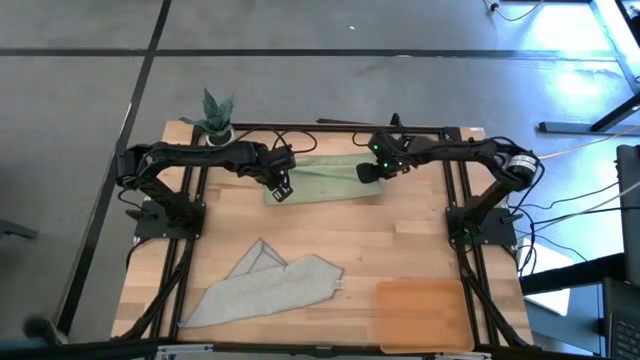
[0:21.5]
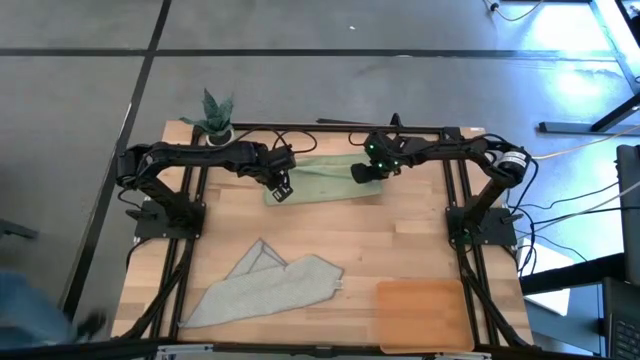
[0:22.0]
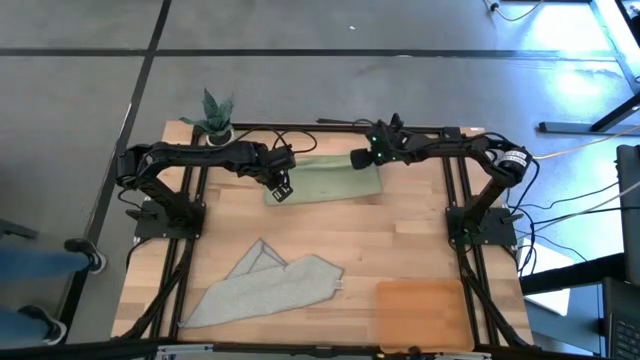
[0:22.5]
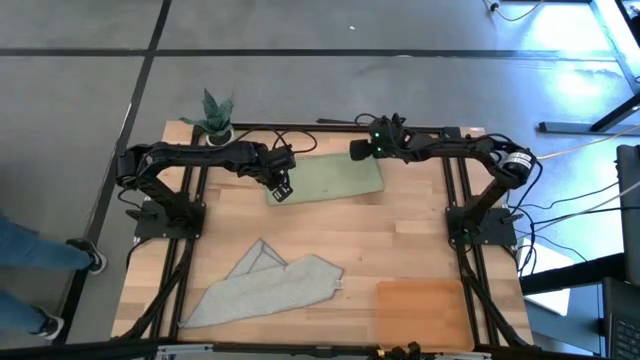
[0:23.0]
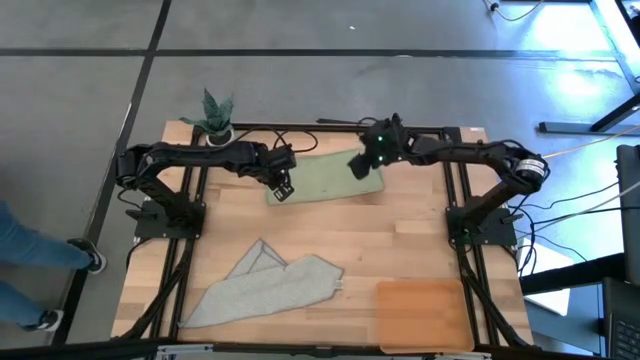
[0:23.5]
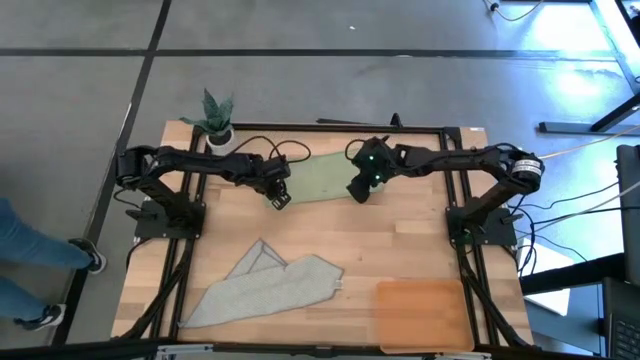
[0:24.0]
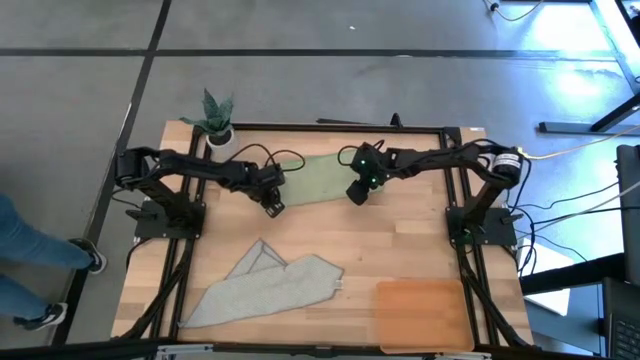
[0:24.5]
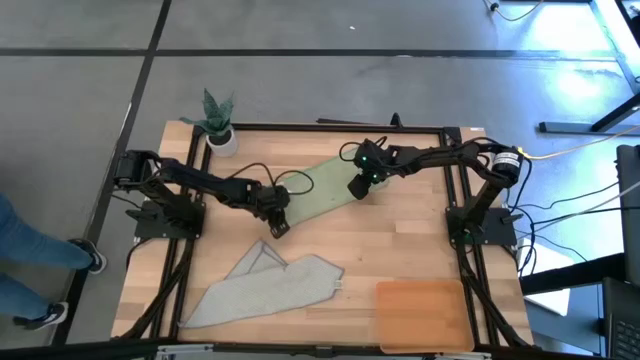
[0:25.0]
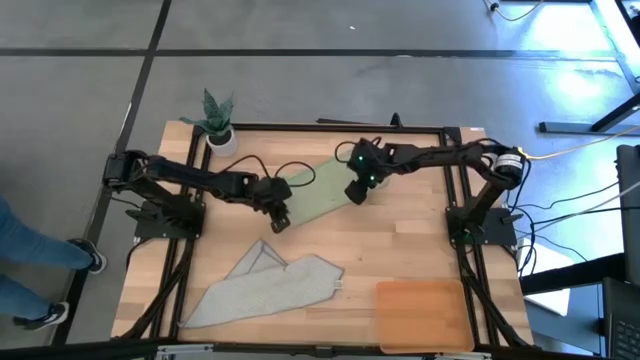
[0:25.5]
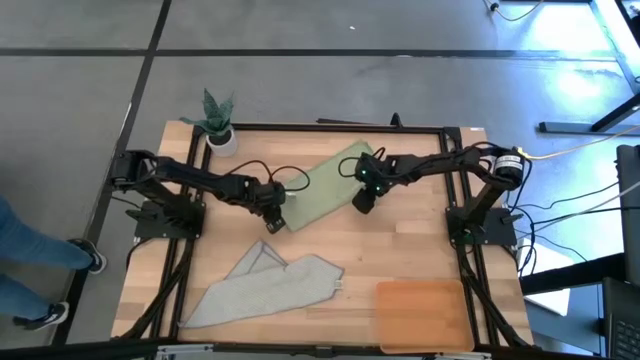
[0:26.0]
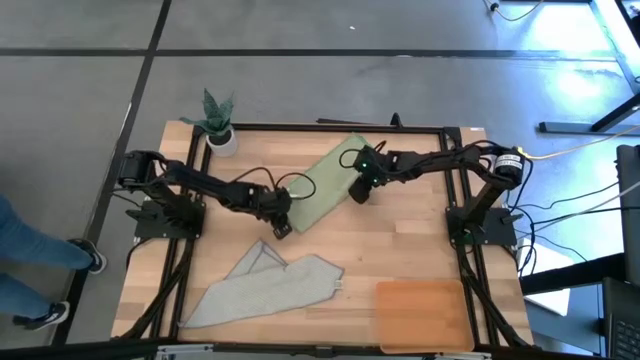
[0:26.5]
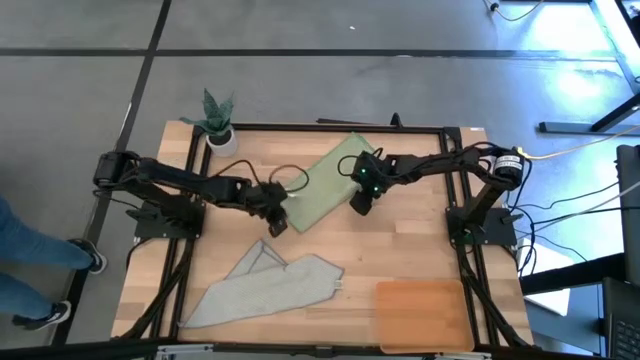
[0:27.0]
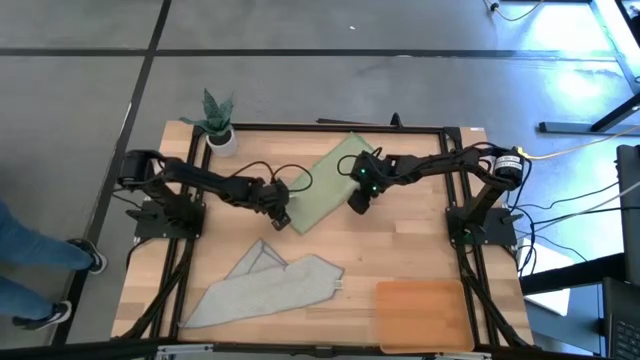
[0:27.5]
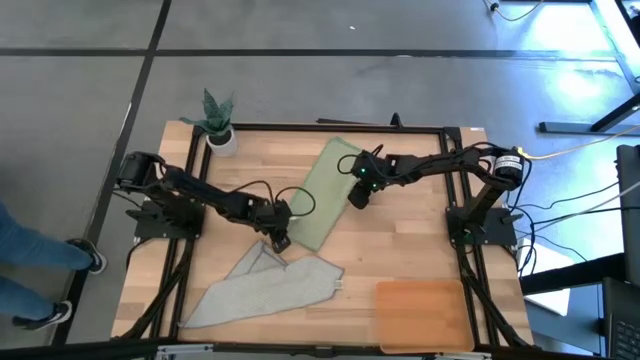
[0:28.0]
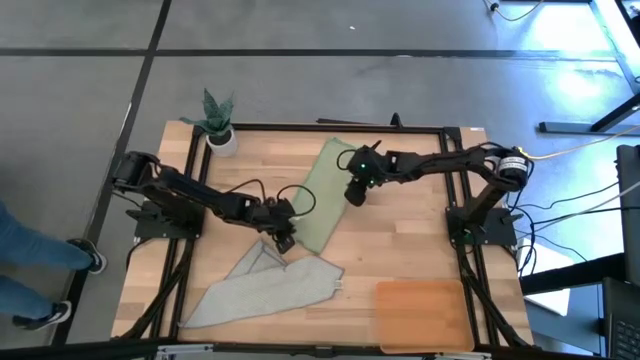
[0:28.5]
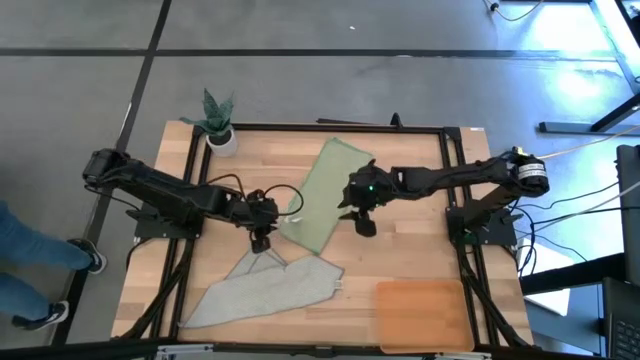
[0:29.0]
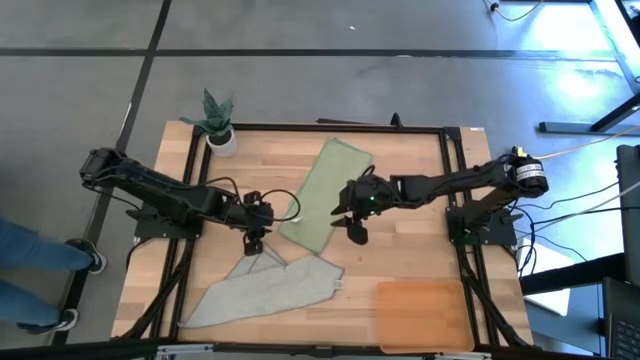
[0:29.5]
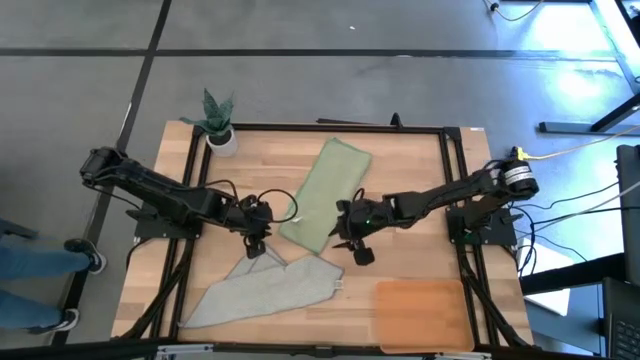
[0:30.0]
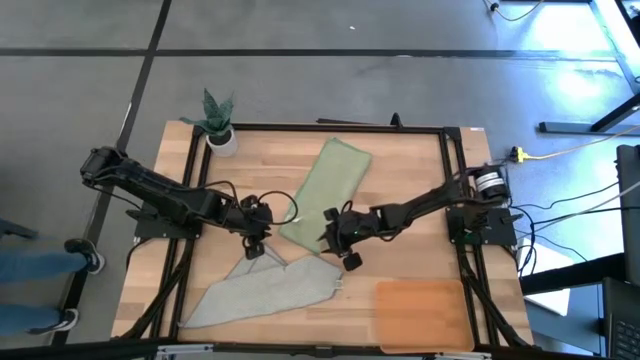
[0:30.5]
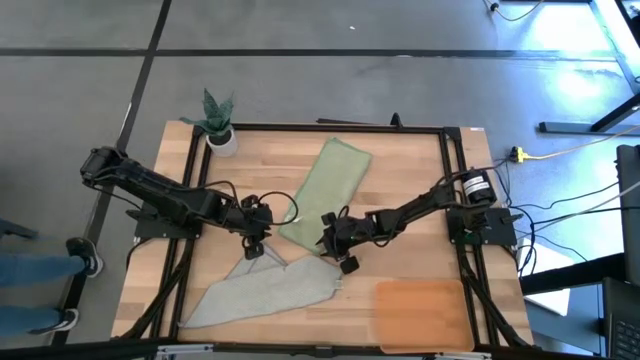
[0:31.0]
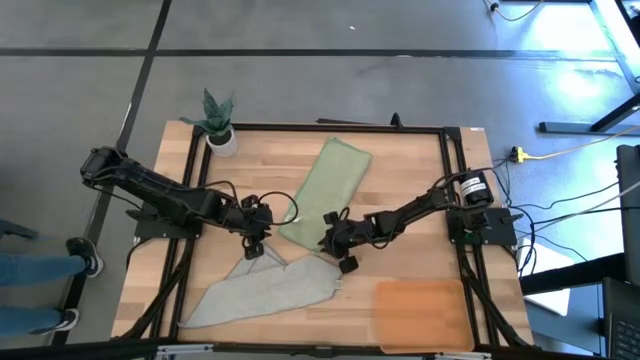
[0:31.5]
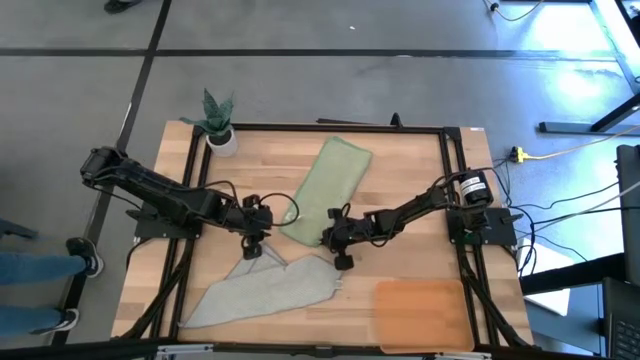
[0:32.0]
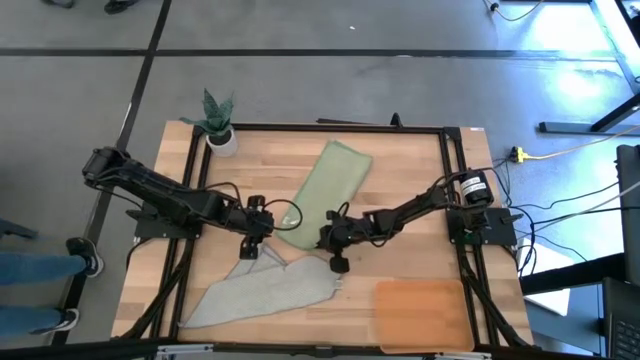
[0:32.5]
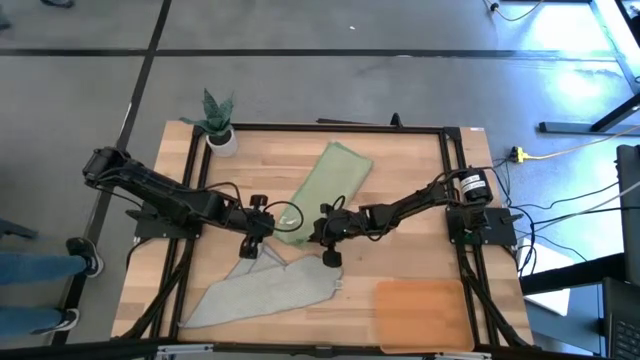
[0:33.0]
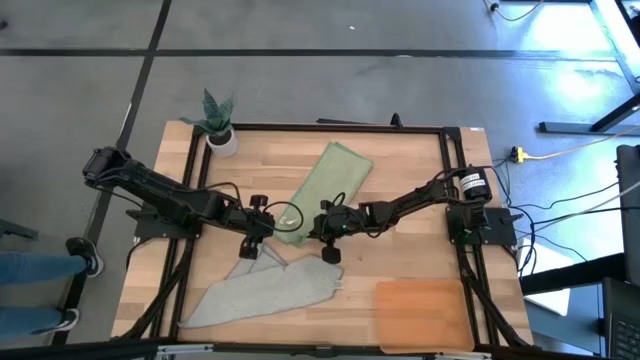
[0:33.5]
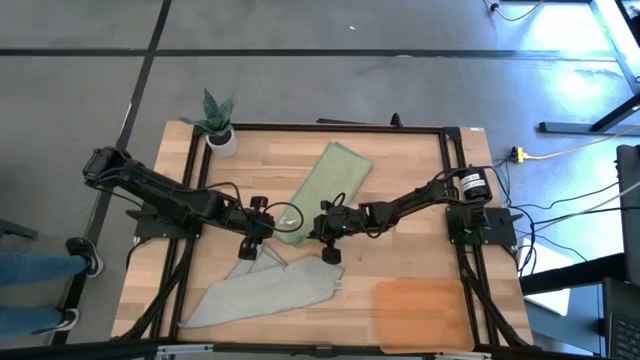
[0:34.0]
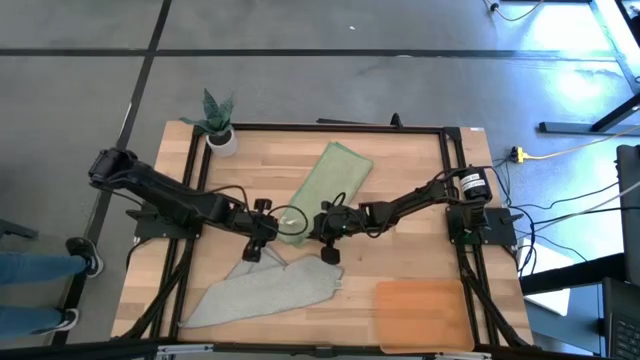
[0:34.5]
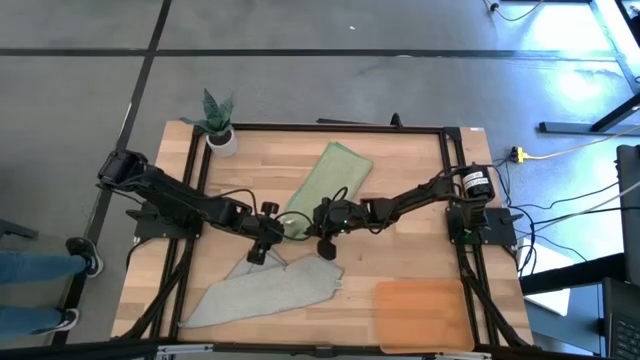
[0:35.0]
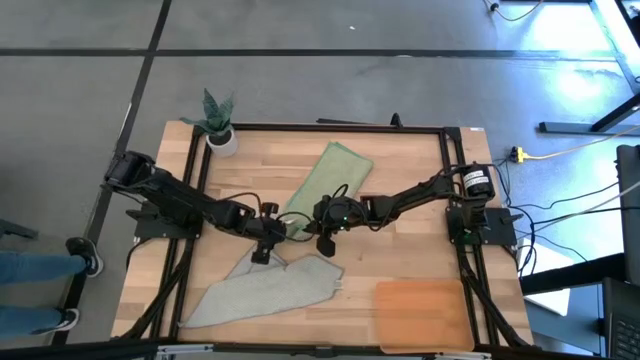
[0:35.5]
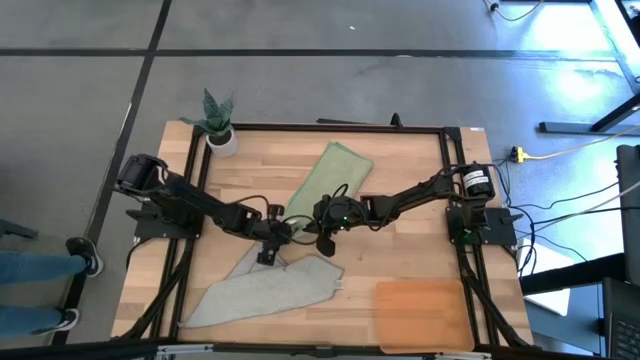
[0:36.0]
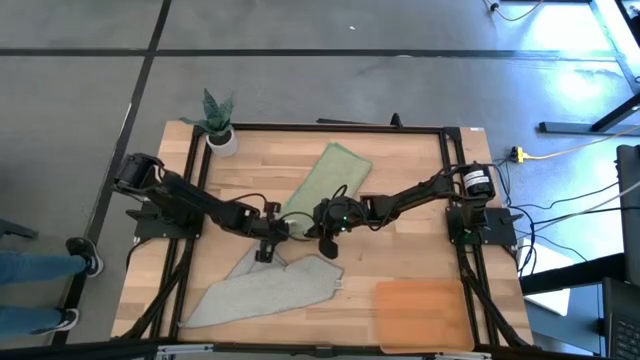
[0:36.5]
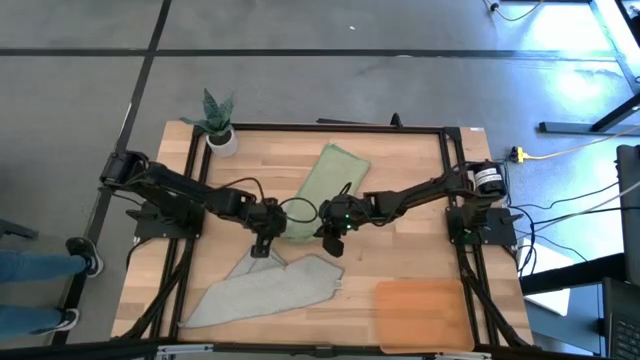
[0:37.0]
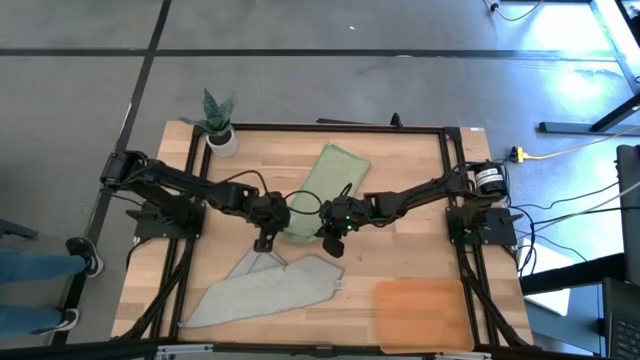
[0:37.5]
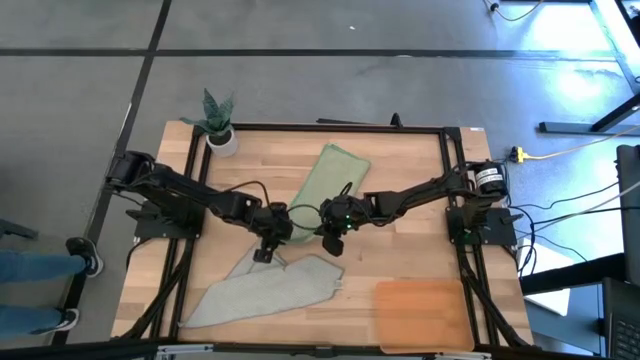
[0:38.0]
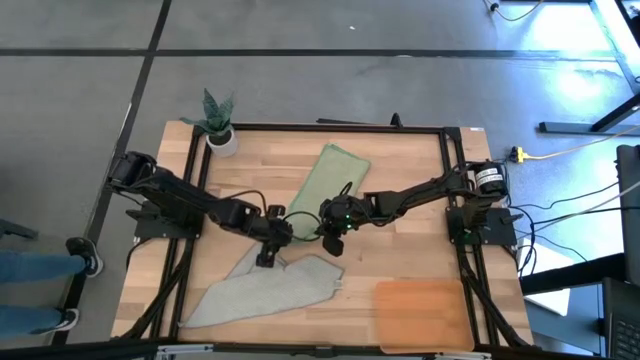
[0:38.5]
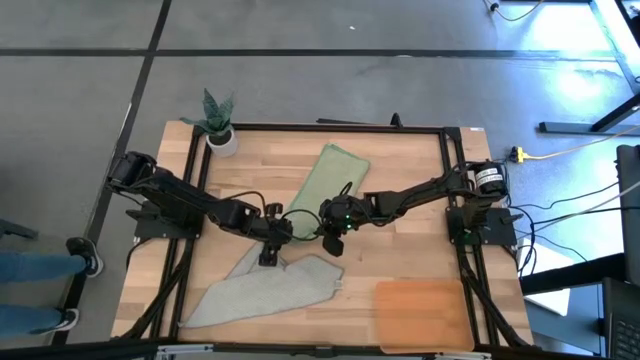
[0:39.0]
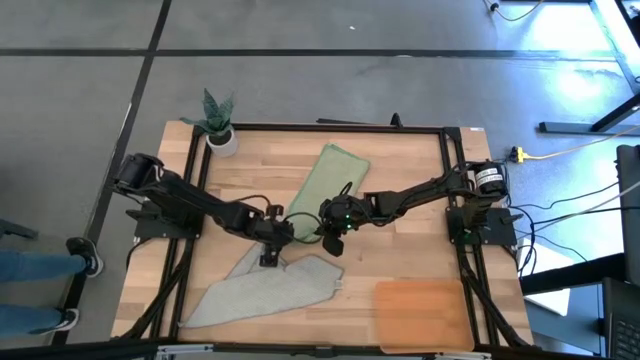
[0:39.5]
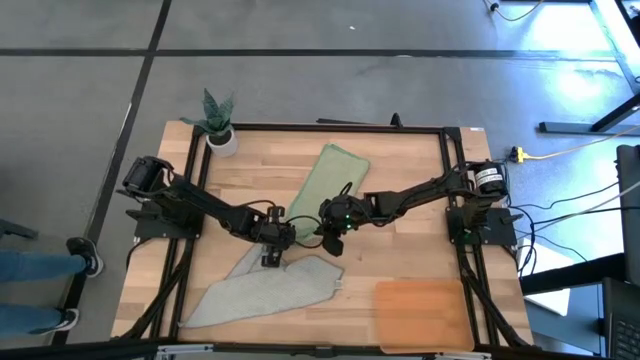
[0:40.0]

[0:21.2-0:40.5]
Task: Roll microfiber towels into tight, uniform cylinder then place into a basket
Roll the green microfiber towel

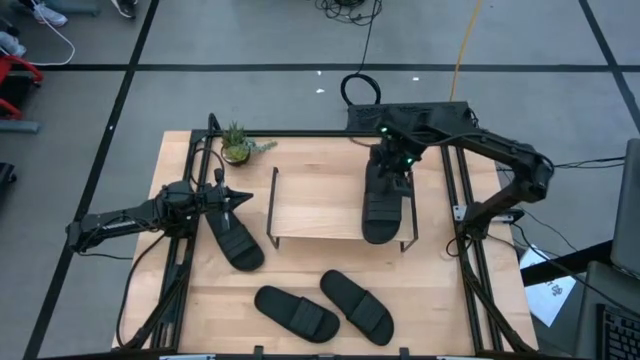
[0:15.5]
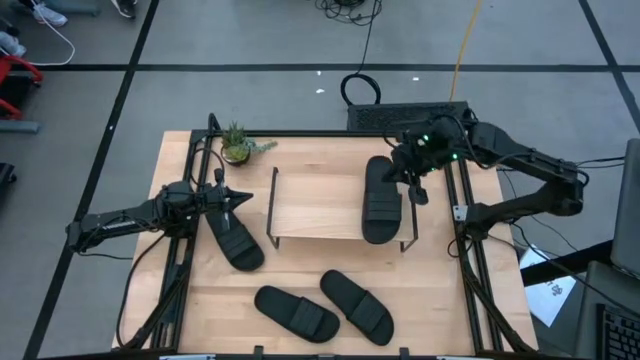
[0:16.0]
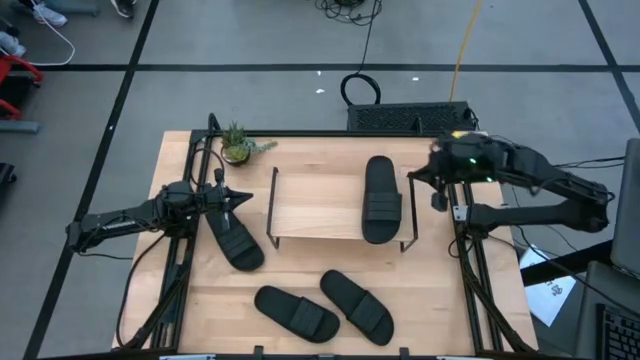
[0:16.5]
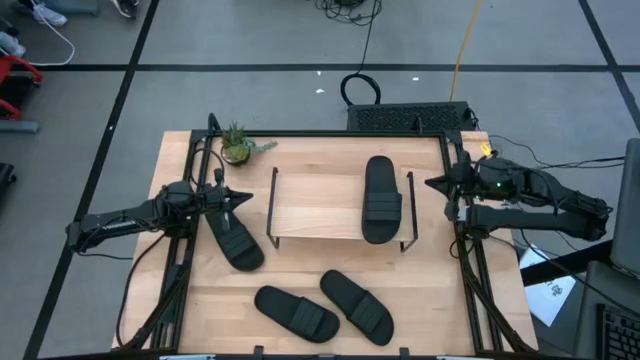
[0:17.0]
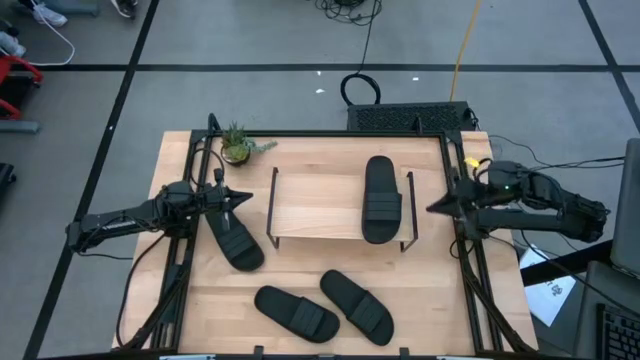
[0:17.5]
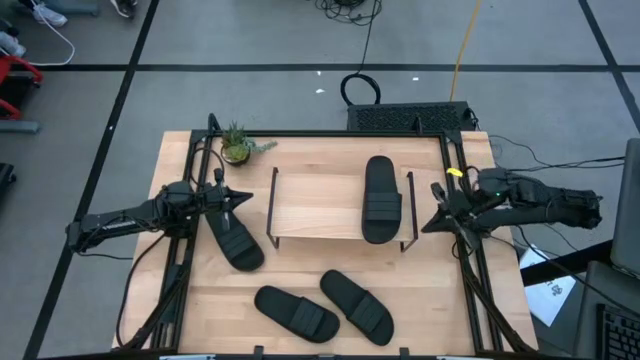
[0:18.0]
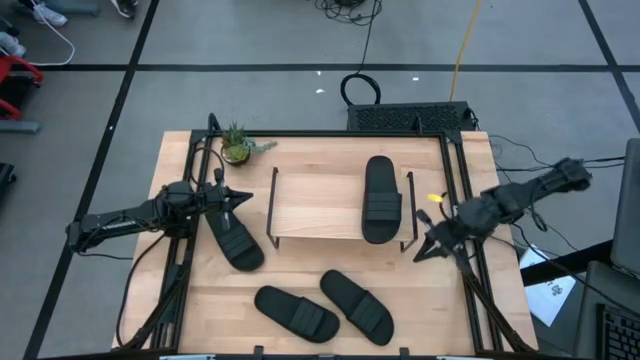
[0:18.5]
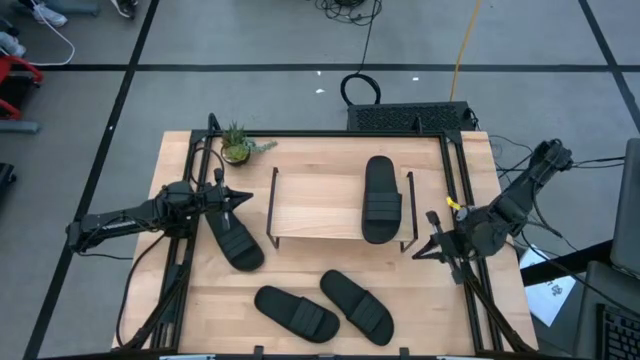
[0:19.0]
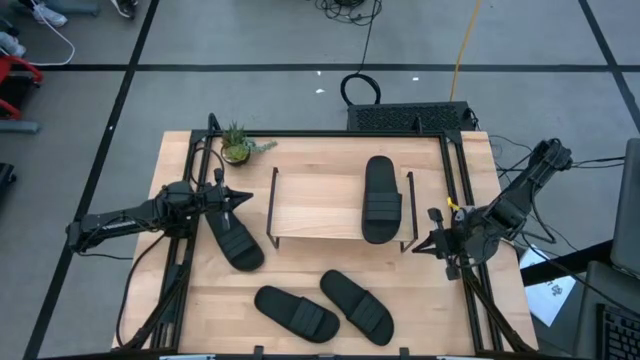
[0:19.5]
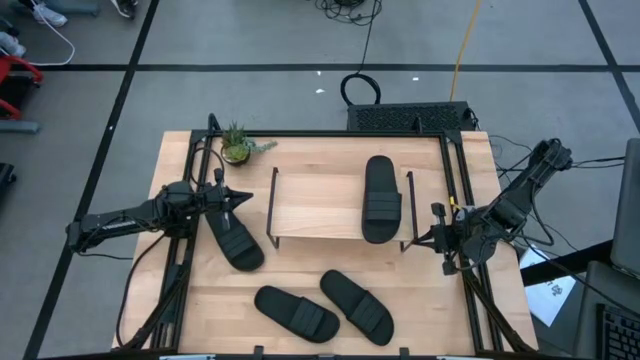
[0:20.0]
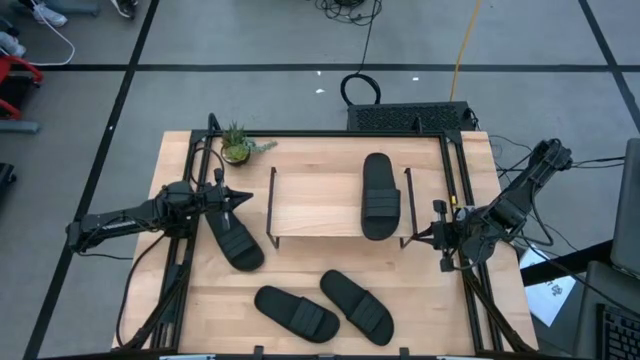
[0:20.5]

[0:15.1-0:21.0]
Task: Pick and place slides into the shelf
Adjust the shelf
